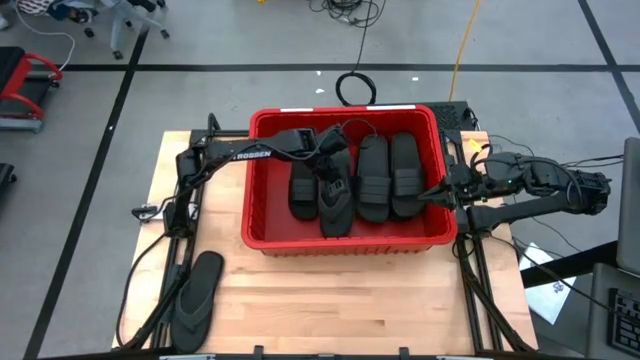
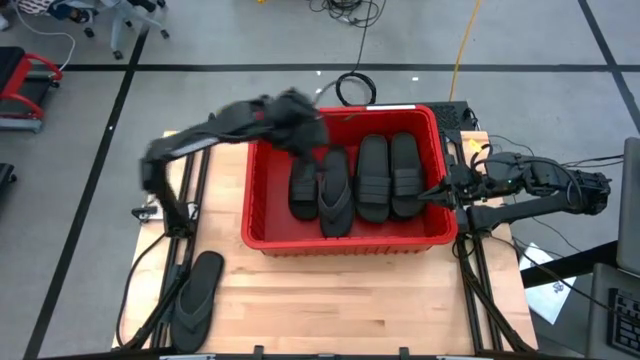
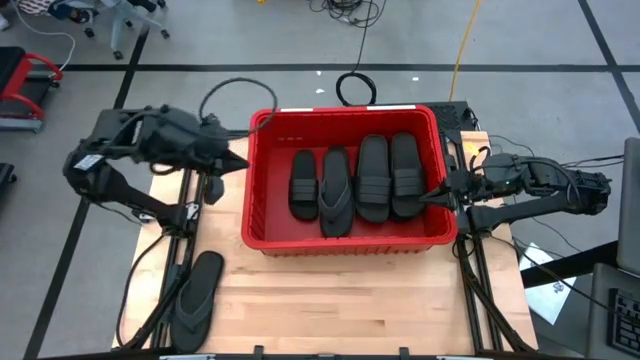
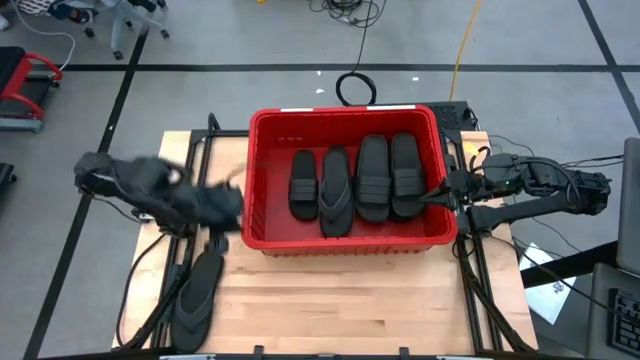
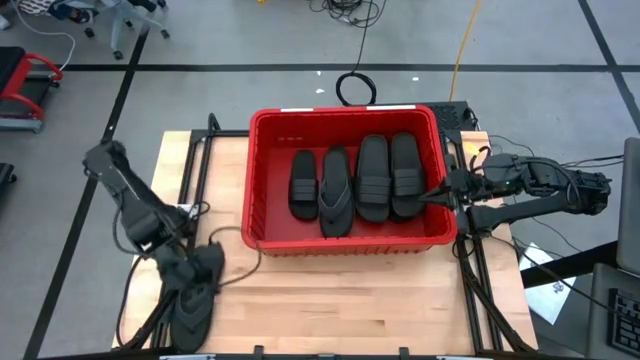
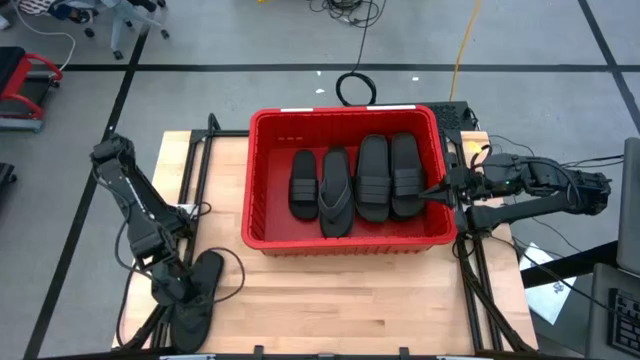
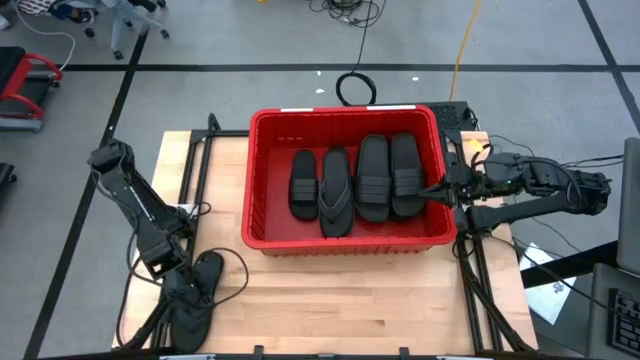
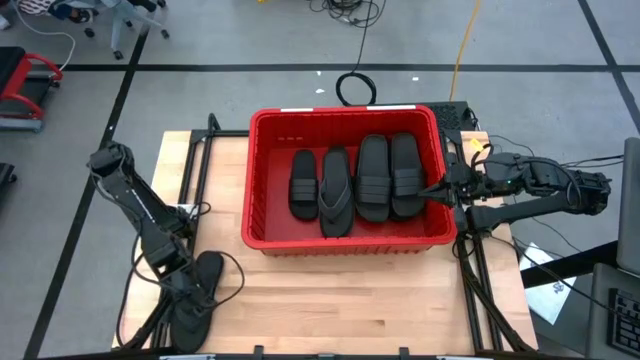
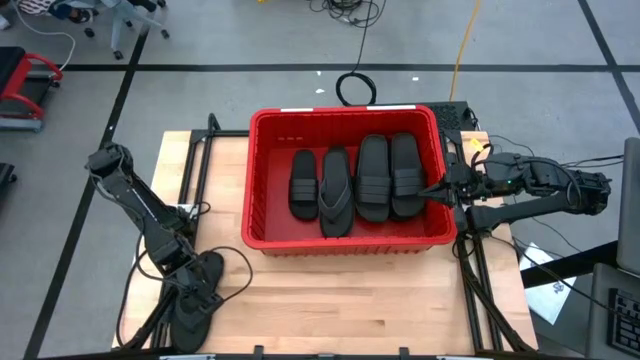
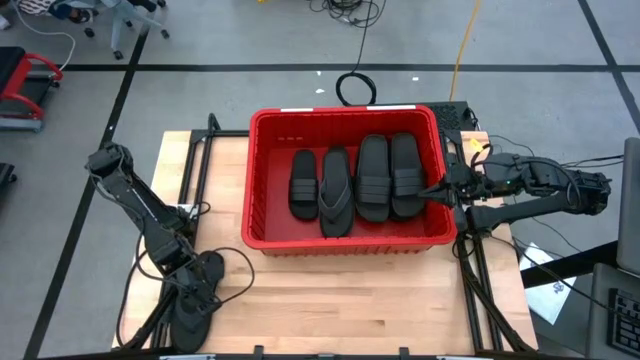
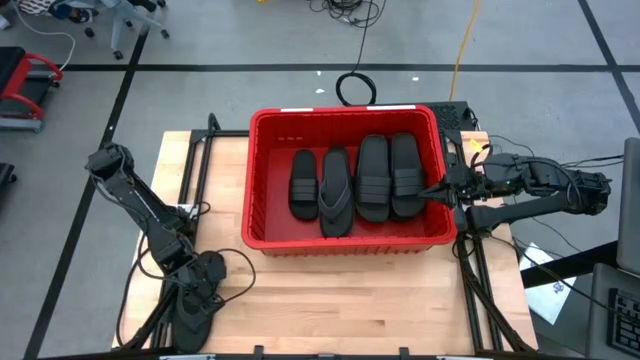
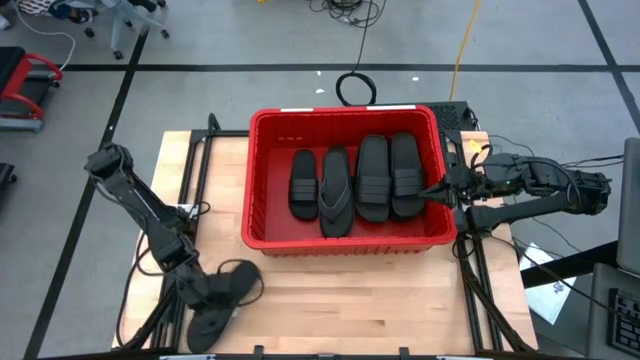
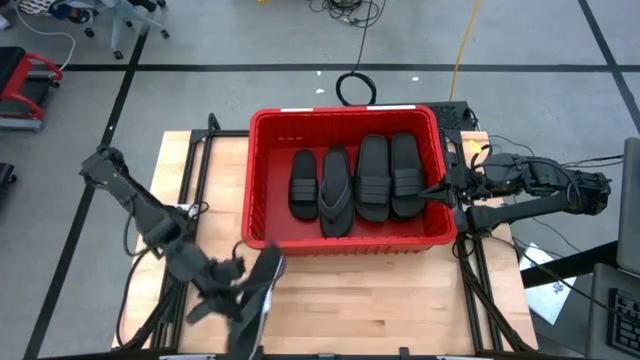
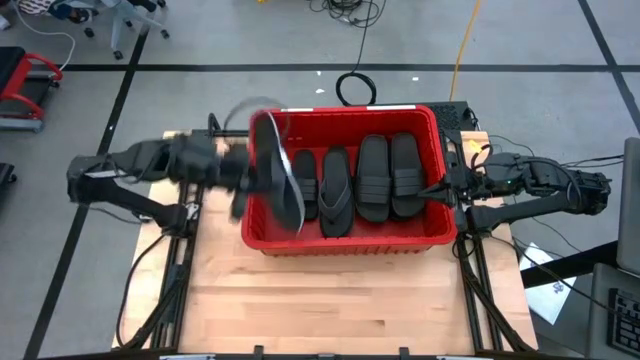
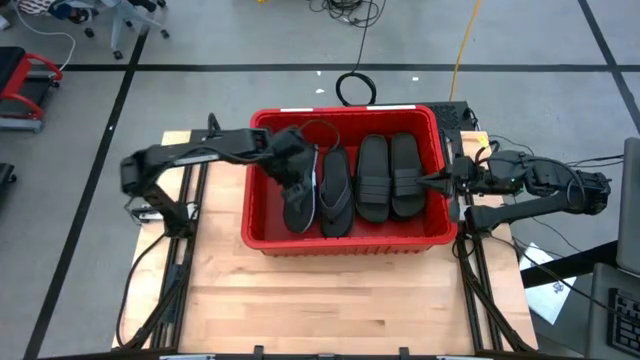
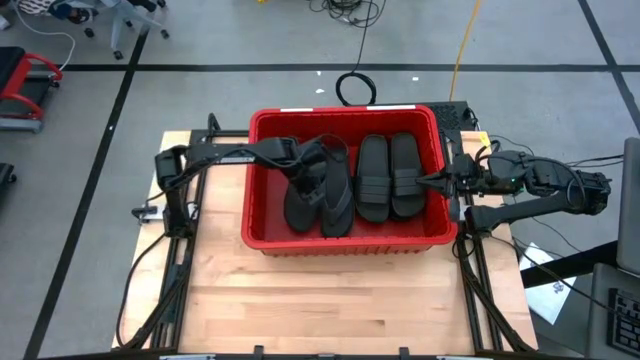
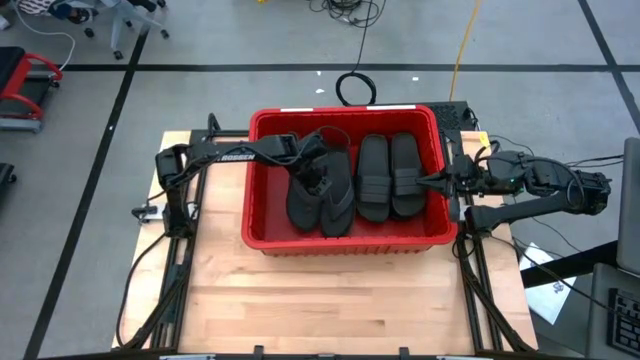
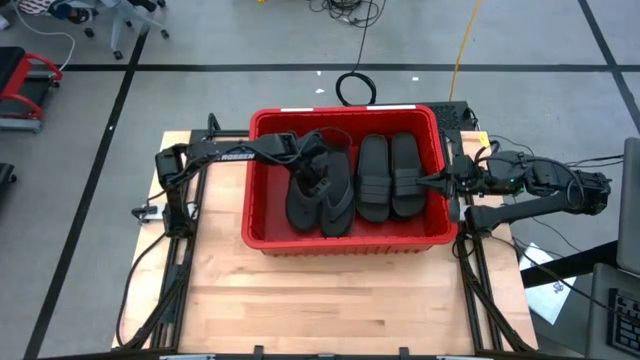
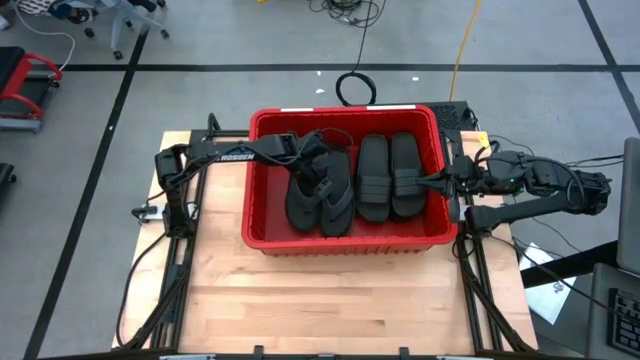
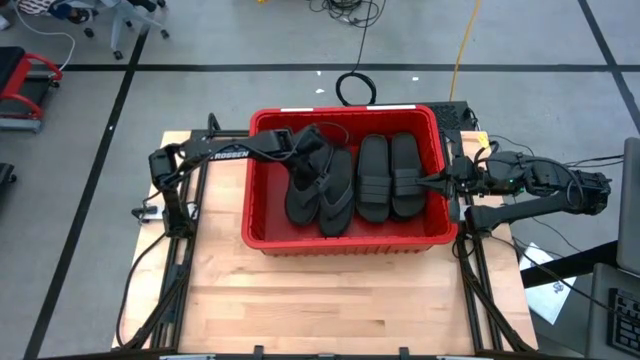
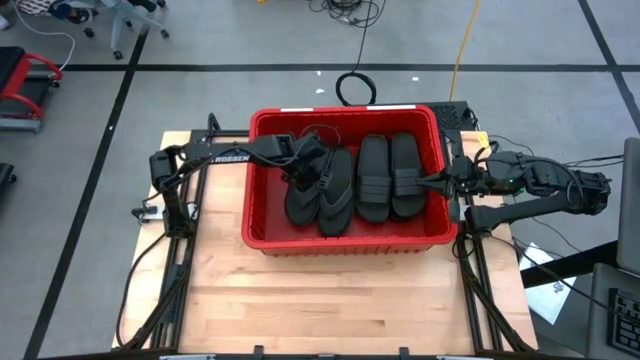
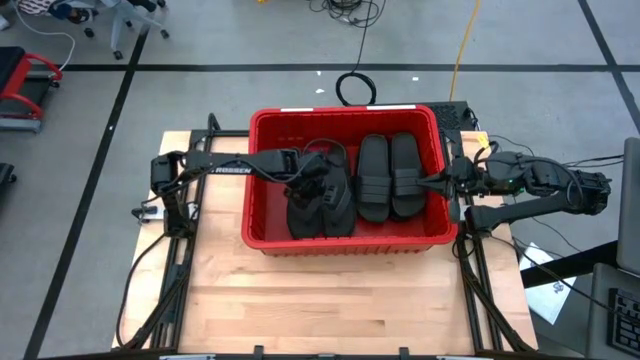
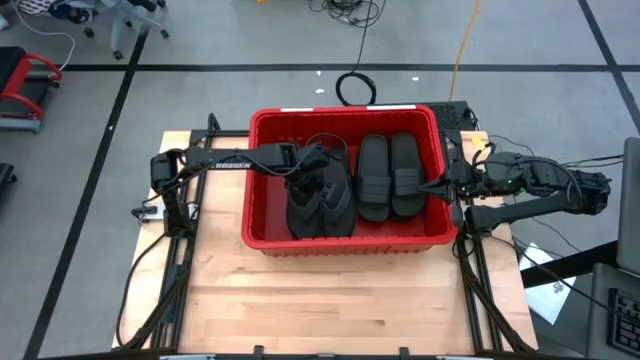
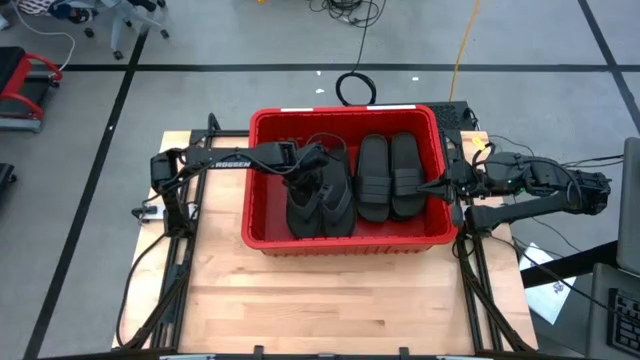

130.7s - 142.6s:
Task: Pick and place slides into bin
Put the black slipper into the red container

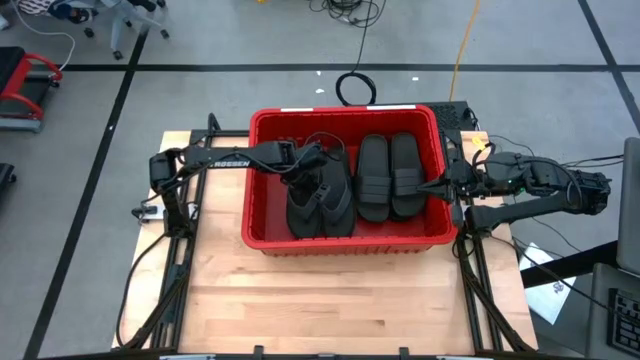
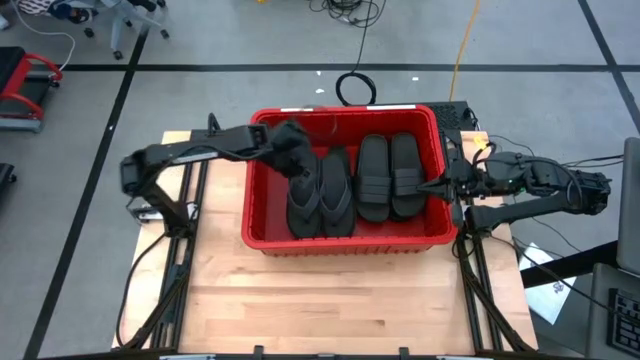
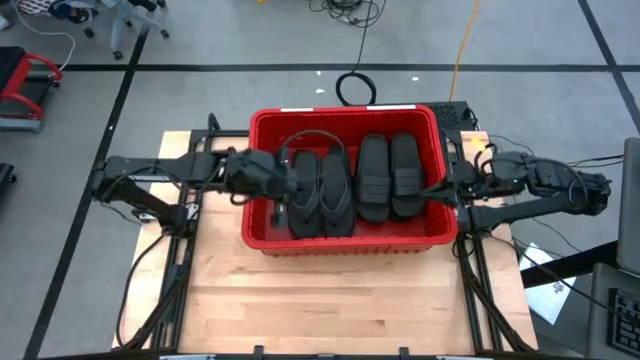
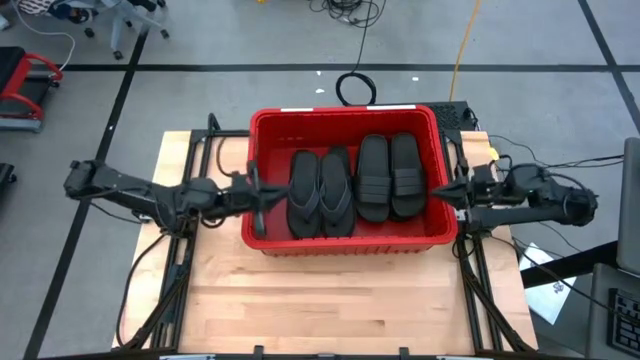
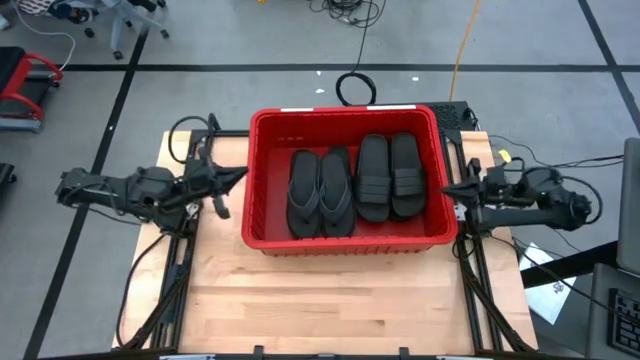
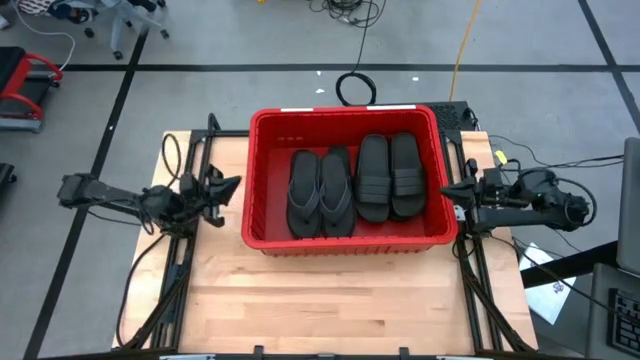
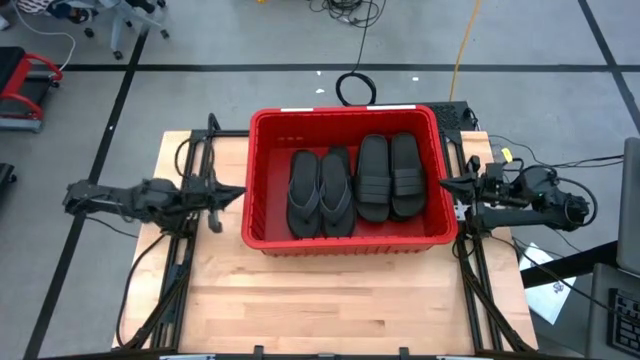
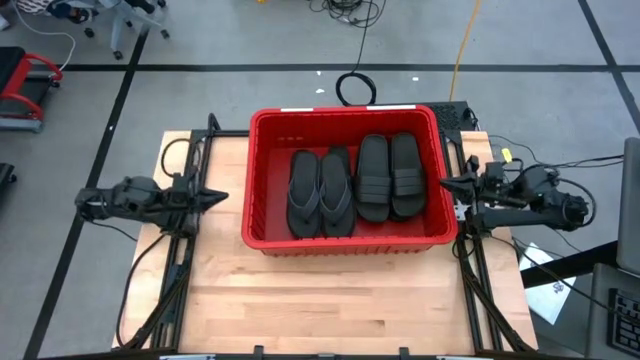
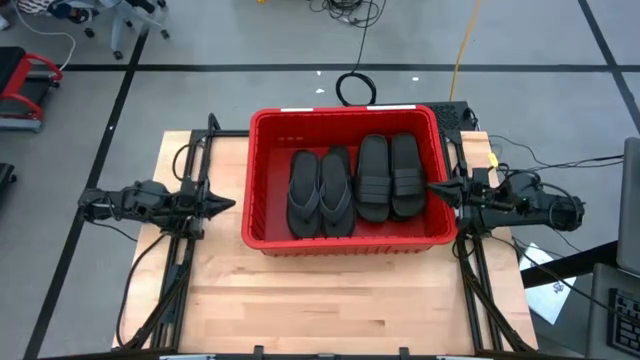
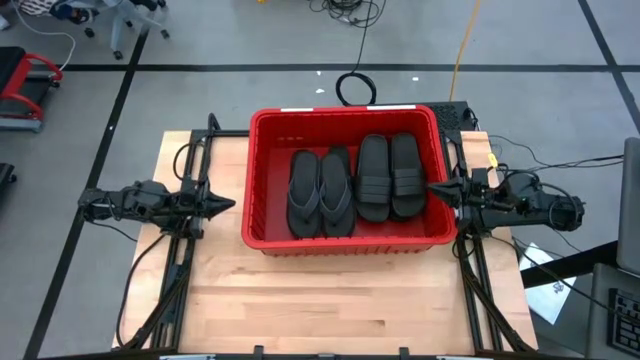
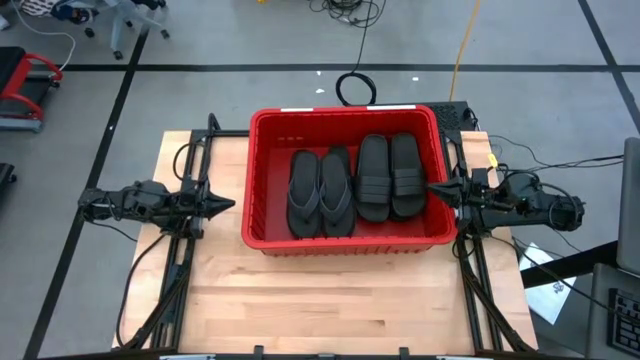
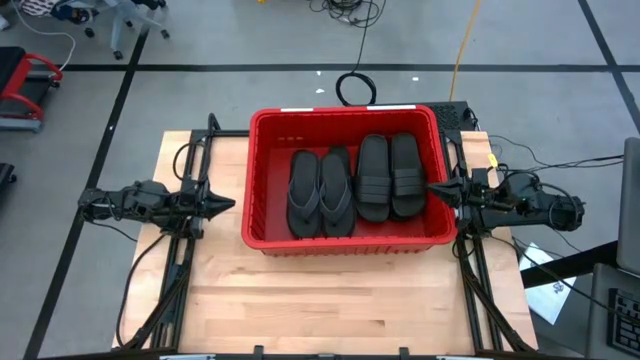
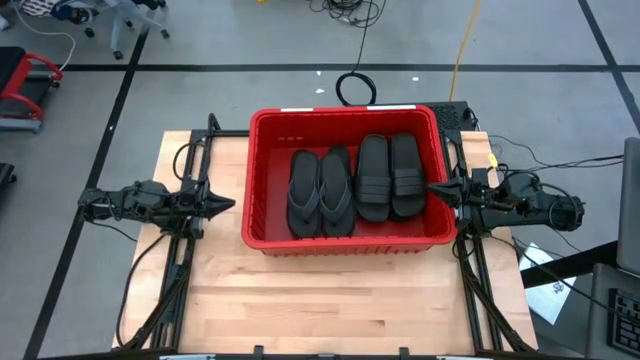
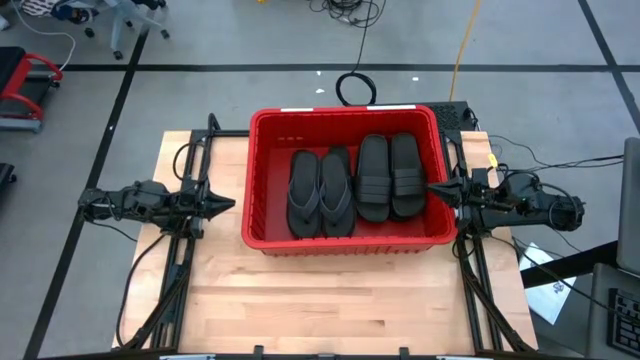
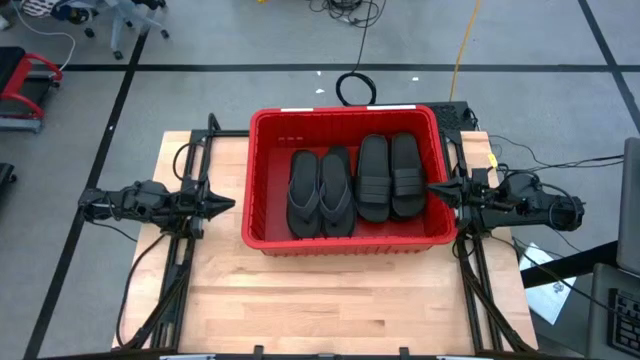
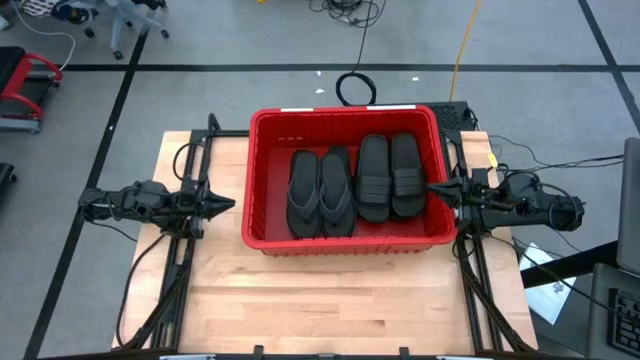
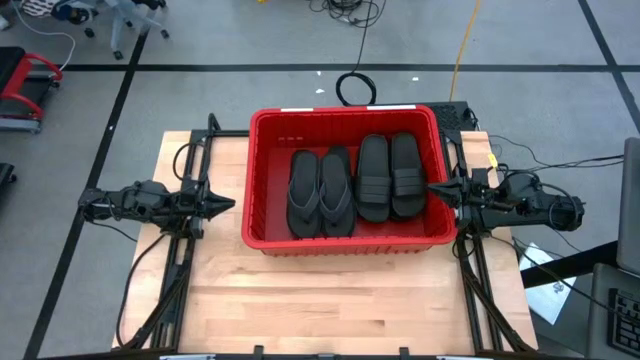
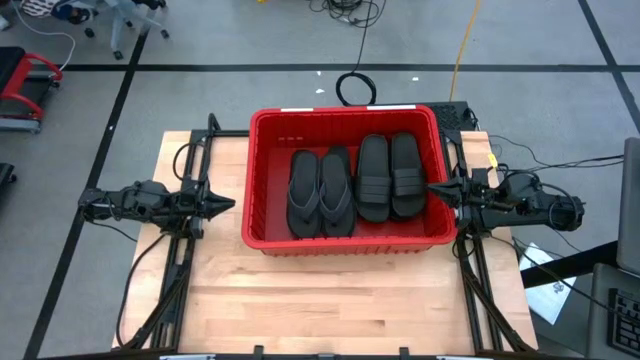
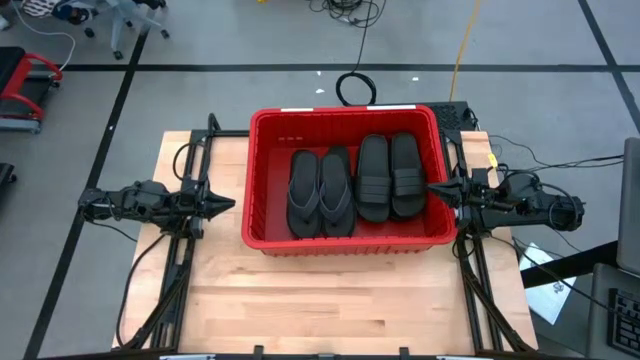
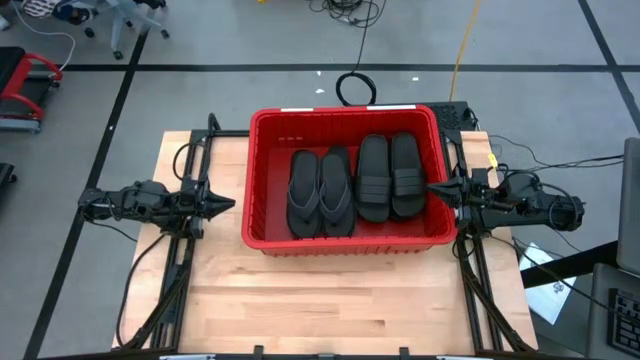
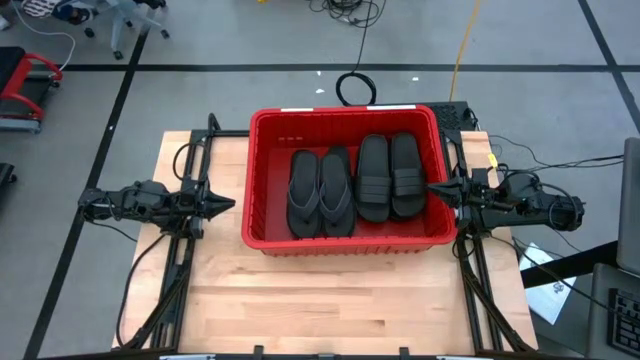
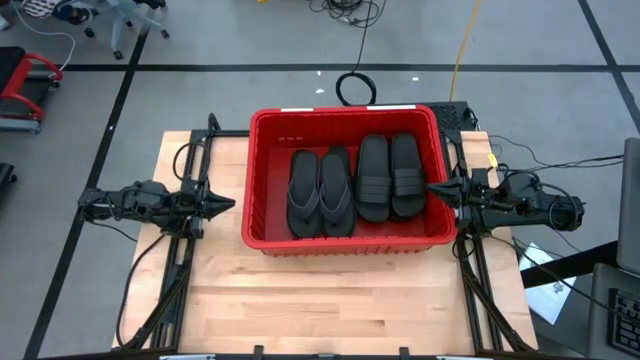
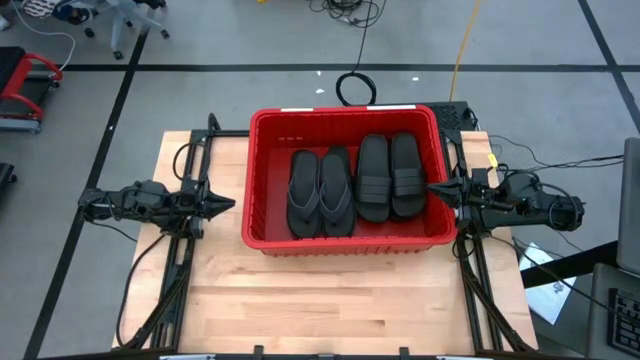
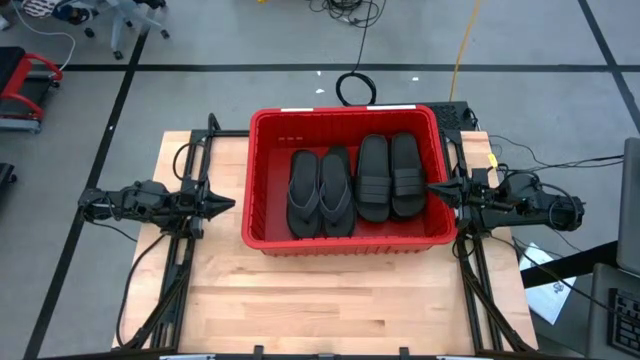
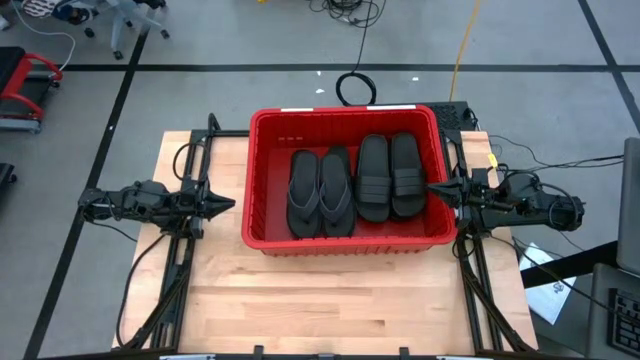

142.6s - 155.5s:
Return to Home Position
